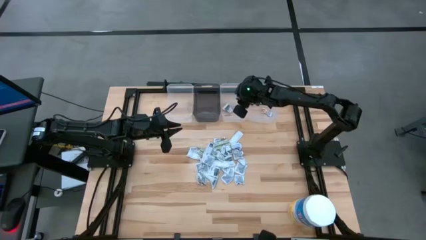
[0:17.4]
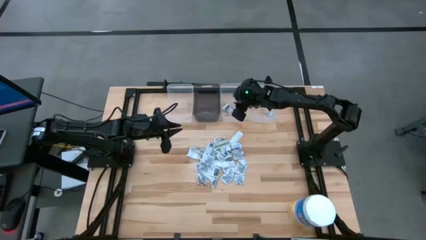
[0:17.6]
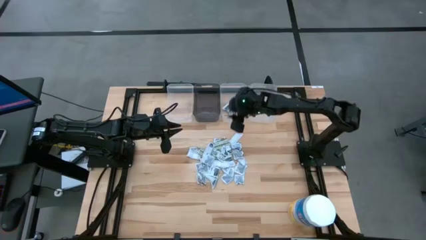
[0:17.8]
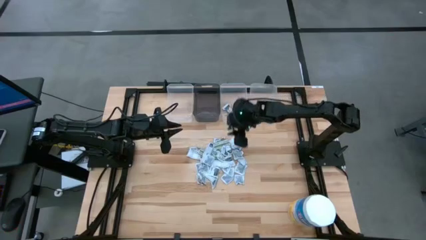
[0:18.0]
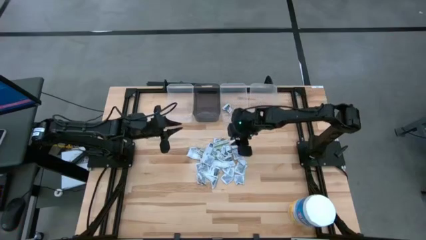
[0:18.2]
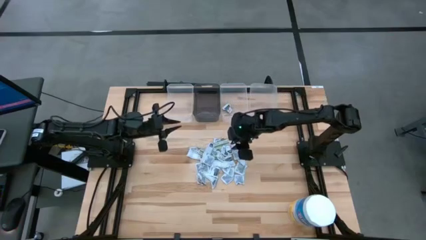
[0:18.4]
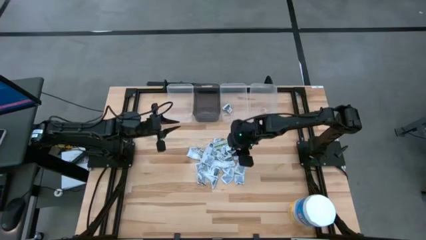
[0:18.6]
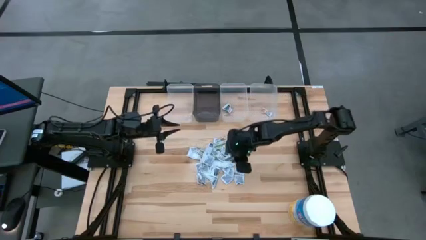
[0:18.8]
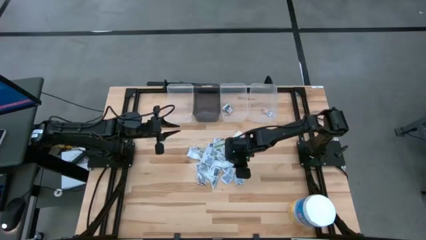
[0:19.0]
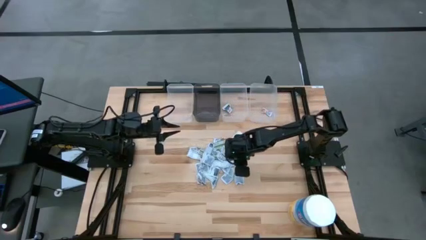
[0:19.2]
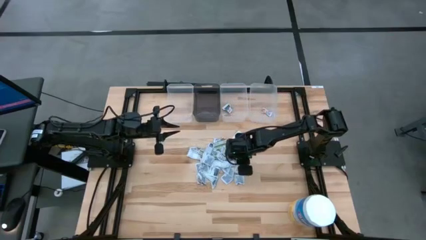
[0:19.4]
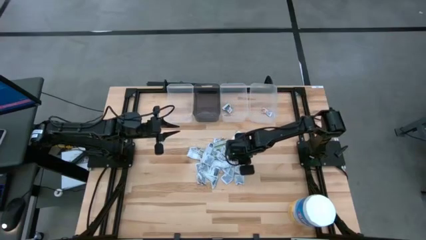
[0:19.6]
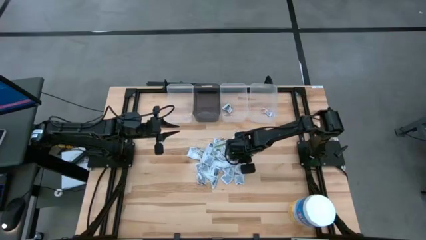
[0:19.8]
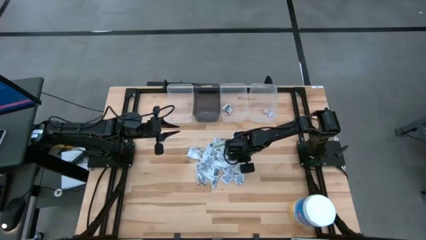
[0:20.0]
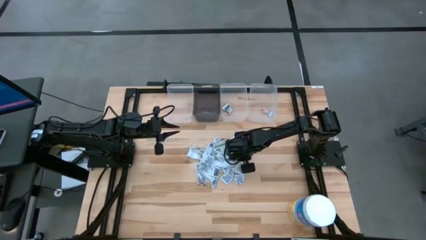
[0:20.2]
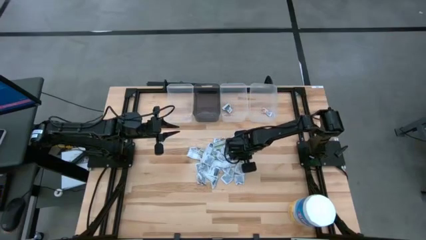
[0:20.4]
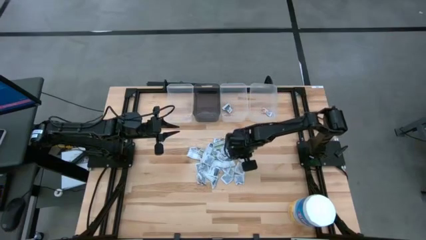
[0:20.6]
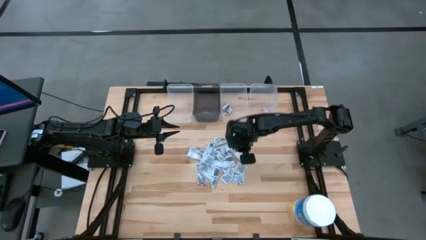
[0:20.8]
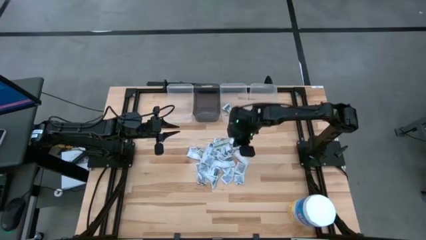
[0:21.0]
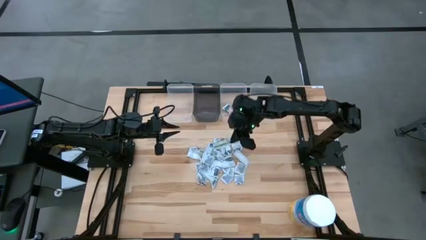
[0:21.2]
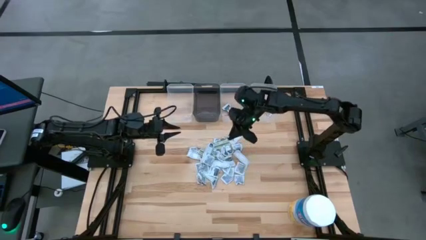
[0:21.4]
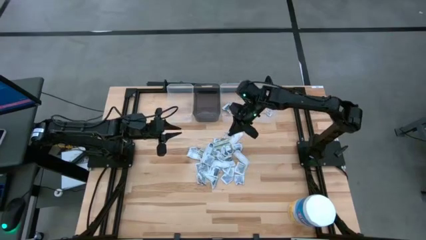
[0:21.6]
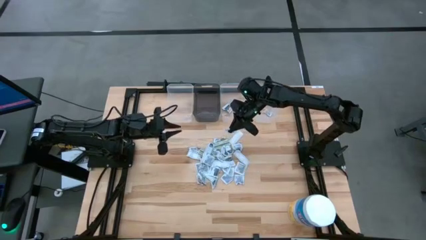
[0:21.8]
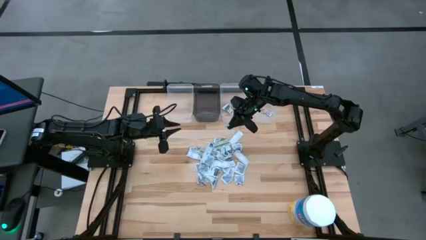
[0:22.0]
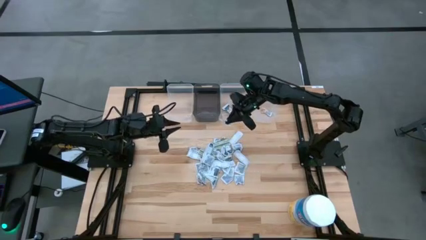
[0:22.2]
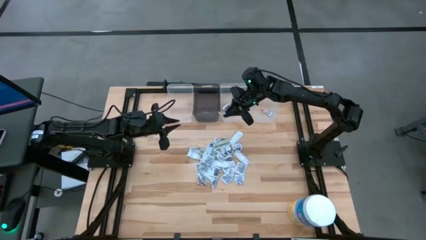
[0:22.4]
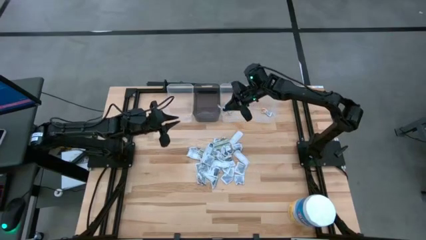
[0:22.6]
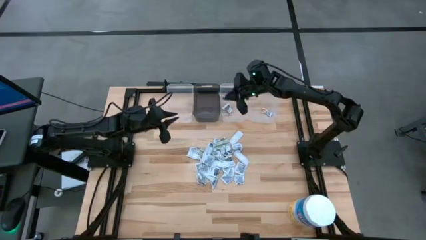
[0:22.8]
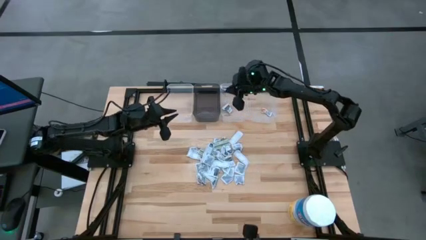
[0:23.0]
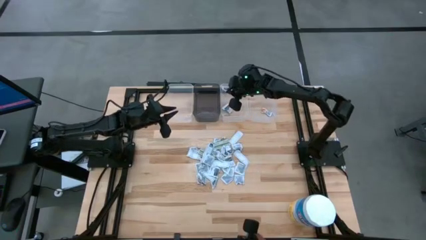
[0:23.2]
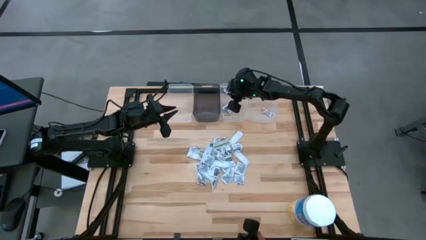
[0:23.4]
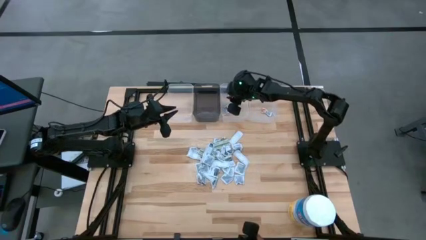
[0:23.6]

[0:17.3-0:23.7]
Task: Pick & Place First Aid Supplies
Put the towelette pack into the middle transparent bin

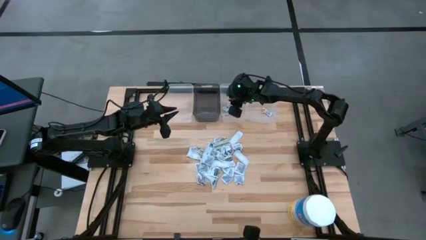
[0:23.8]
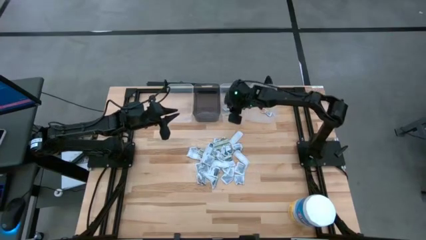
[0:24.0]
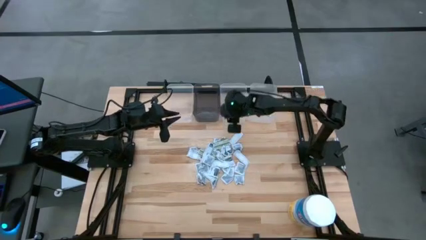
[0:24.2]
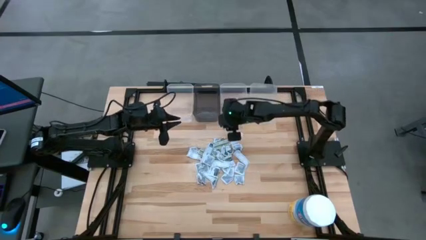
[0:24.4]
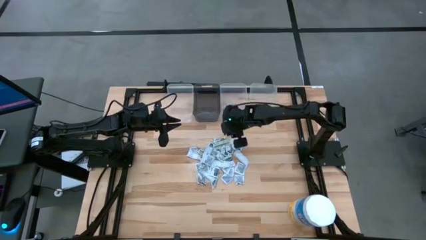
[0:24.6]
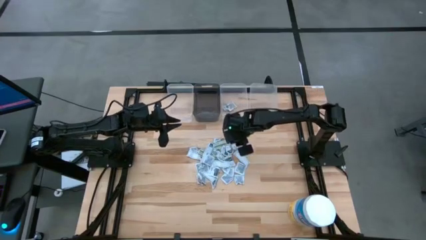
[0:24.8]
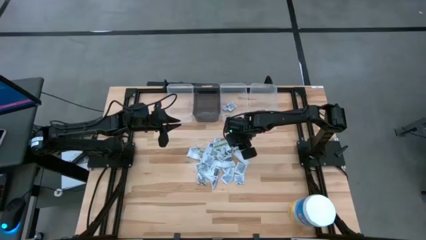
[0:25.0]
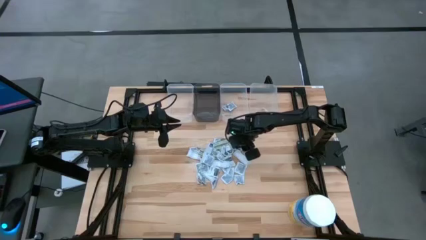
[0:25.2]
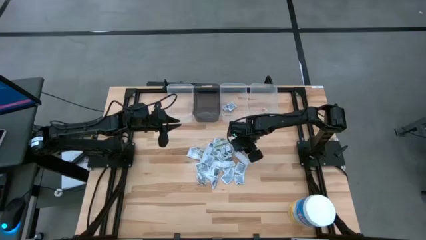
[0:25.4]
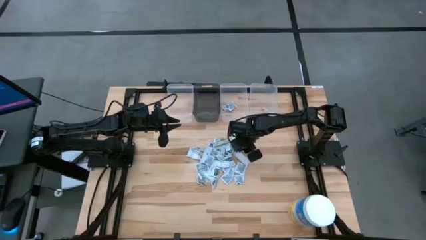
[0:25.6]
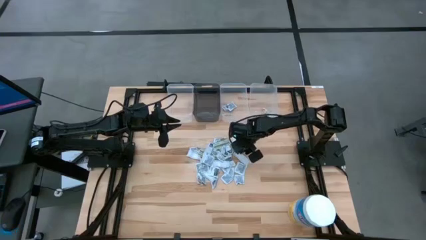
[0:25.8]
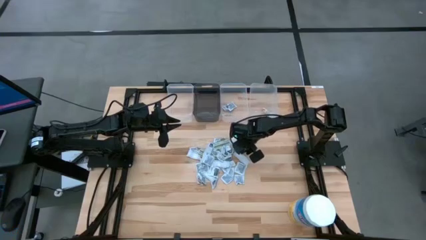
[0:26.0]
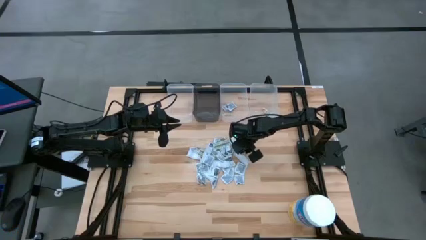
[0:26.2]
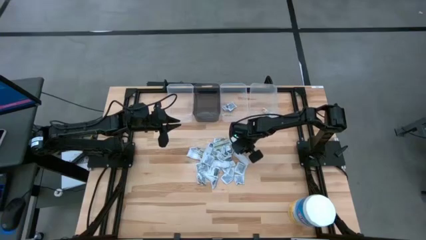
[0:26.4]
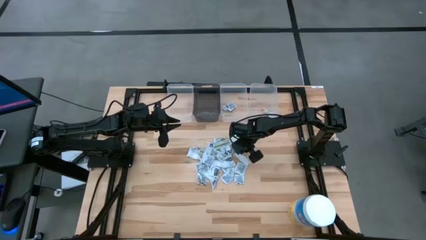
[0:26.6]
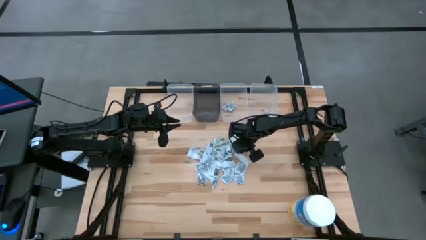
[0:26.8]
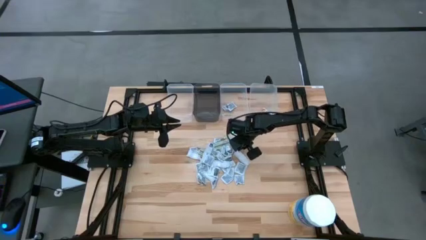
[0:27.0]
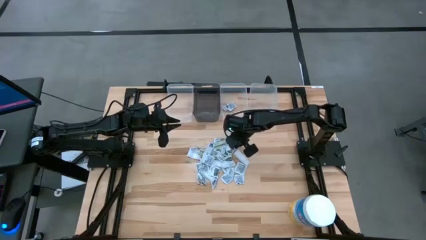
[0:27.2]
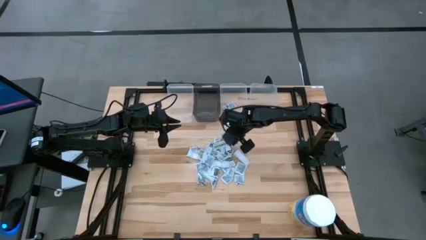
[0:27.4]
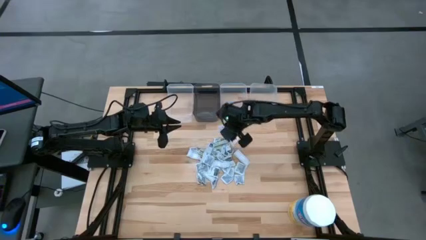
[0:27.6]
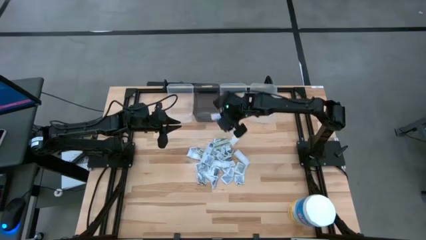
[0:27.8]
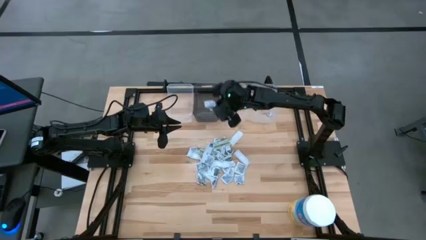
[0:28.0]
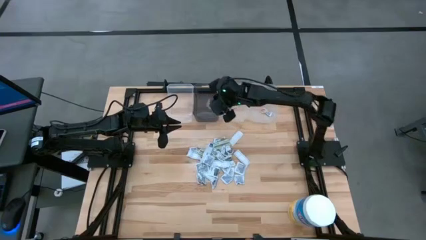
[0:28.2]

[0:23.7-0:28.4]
Put the alcohol pad into the black bin

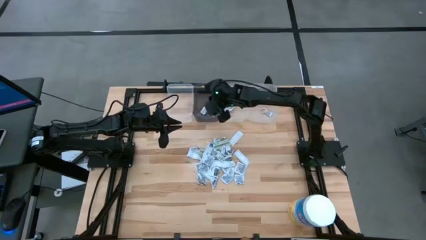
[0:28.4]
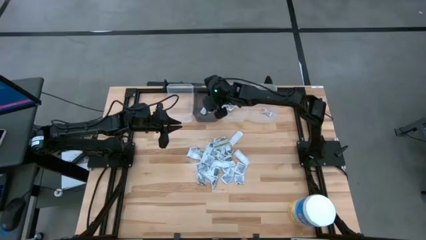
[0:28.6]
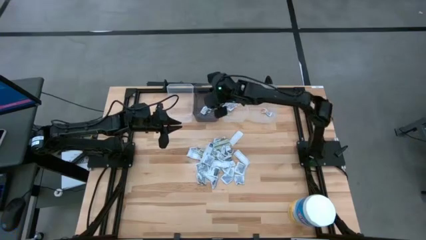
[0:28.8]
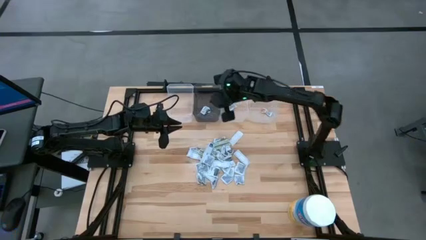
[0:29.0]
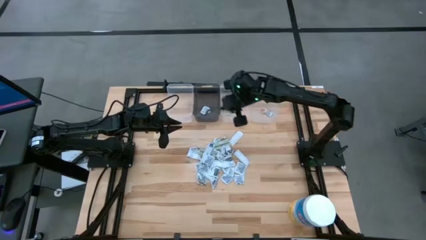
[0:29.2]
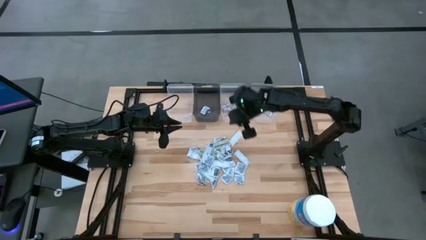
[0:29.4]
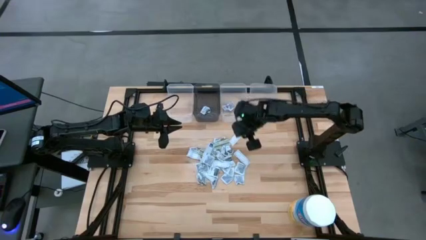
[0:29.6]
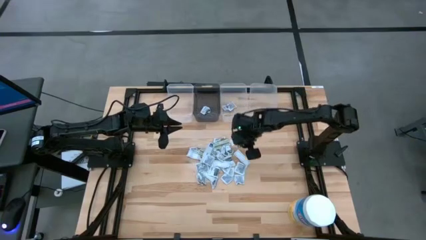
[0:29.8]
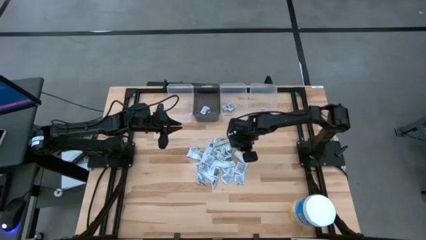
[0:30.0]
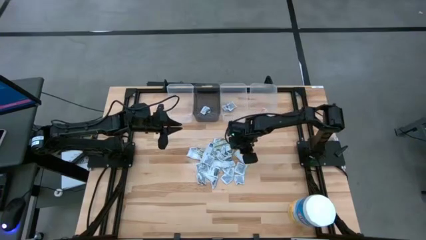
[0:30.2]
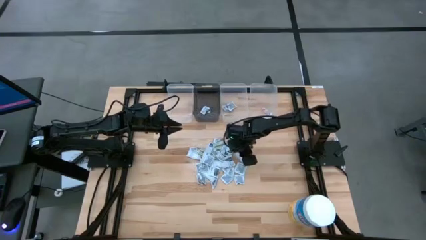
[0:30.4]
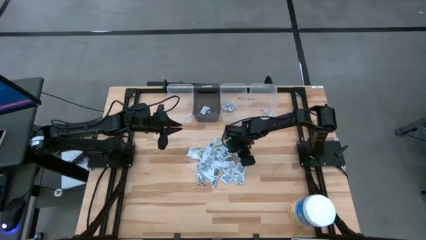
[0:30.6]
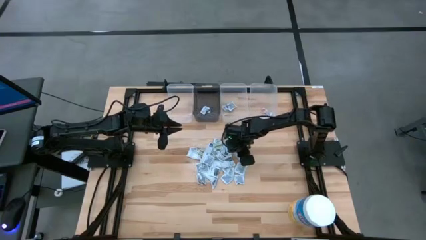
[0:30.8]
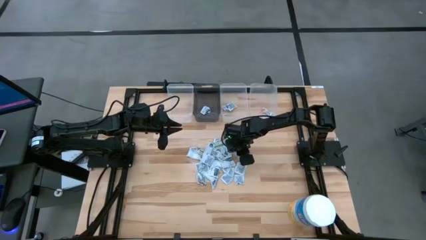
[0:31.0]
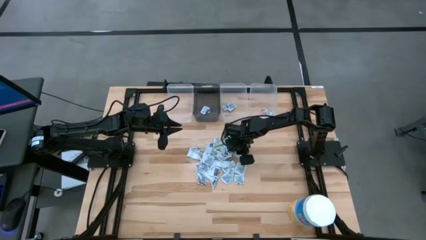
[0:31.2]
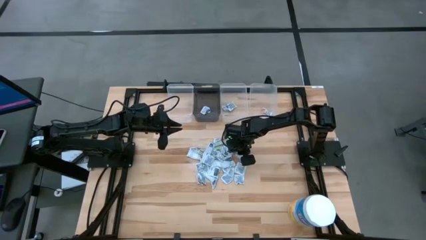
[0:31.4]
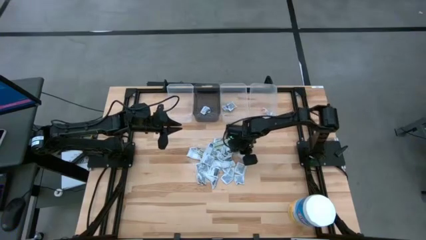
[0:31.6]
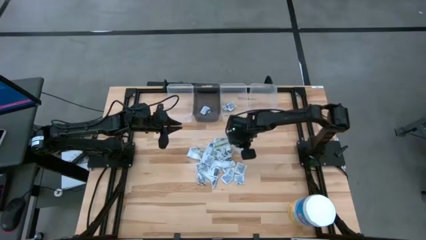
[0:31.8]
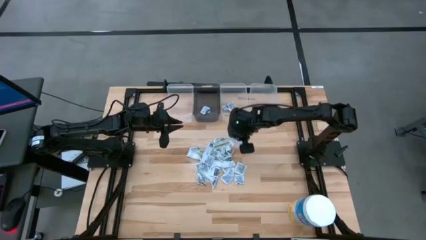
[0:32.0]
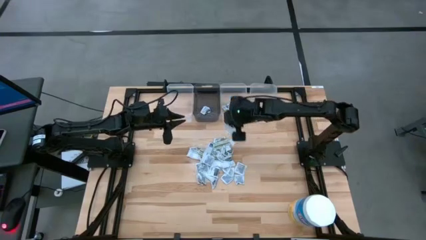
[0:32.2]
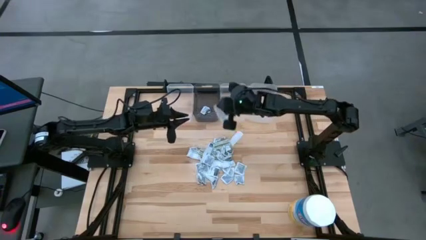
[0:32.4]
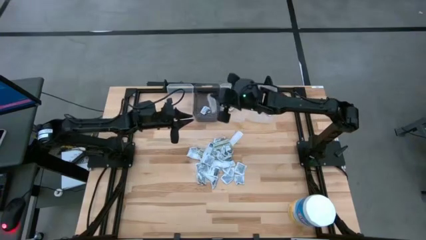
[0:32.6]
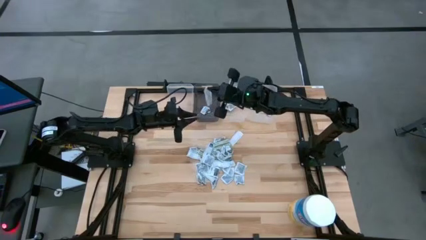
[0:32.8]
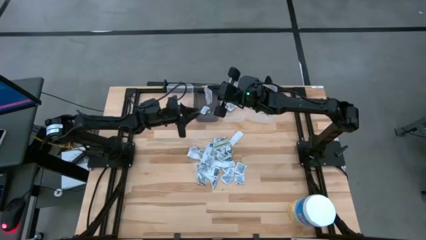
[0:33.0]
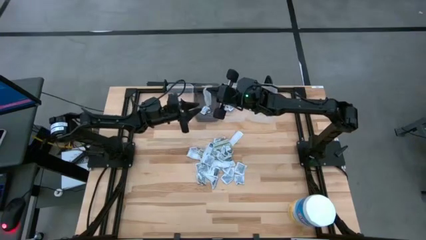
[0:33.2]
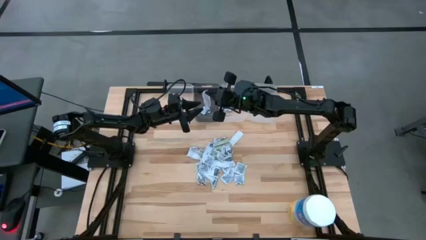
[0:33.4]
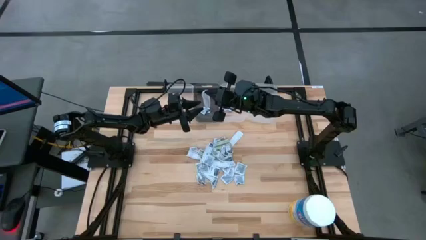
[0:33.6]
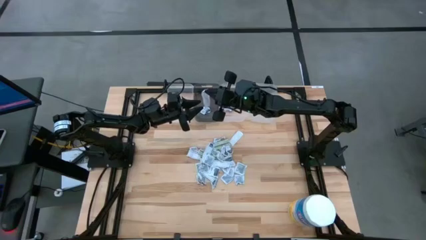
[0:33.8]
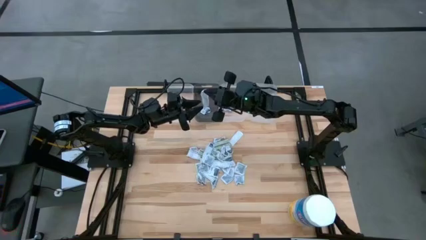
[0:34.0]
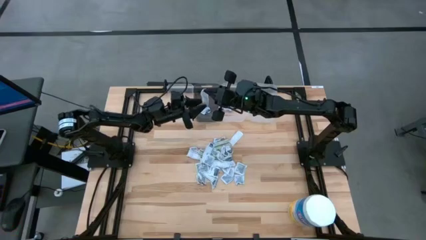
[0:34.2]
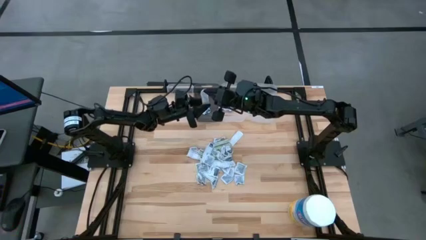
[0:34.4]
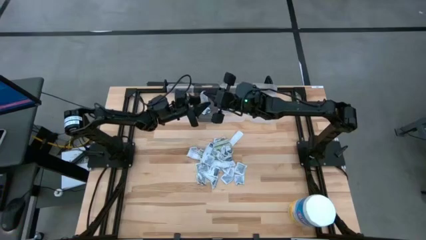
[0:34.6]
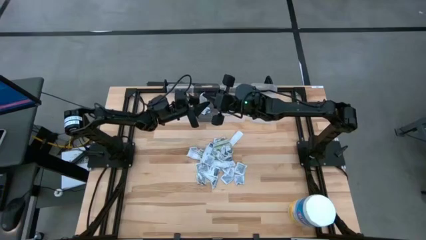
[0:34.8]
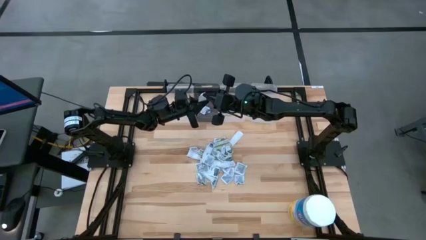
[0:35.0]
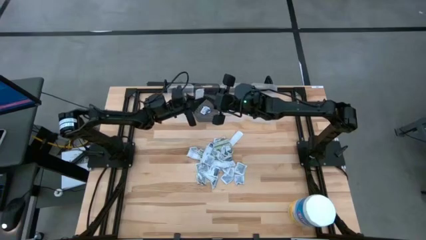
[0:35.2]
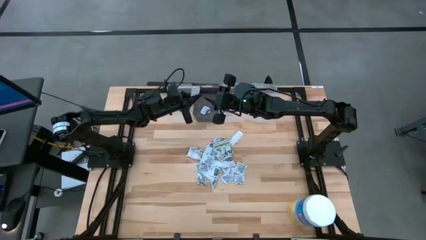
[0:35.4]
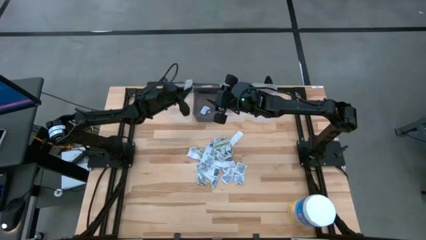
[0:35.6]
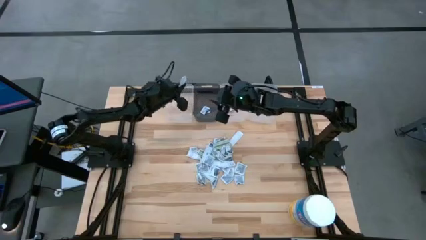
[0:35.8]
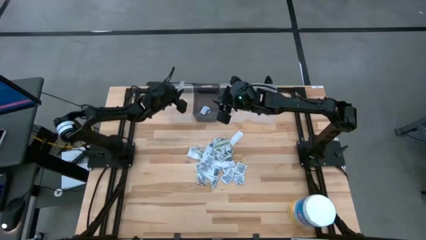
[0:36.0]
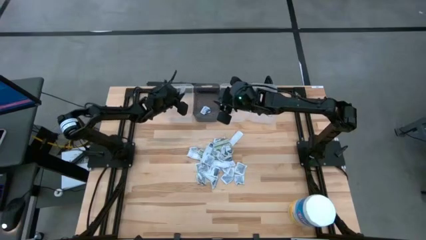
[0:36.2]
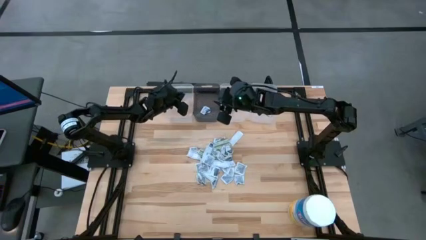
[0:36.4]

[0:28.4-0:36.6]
Put the bandage into the left transparent bin
